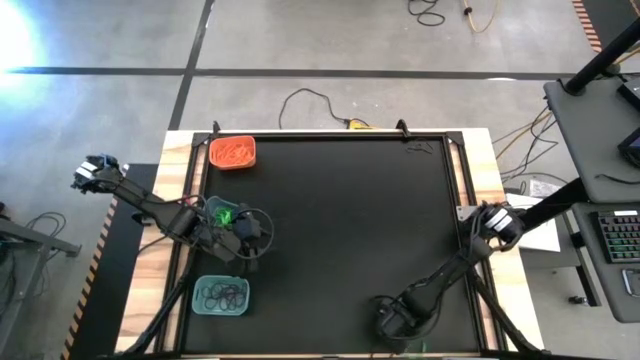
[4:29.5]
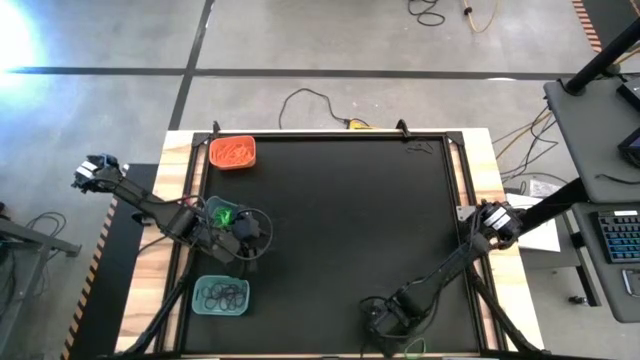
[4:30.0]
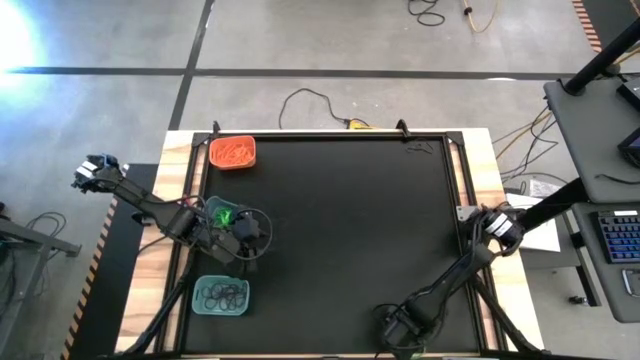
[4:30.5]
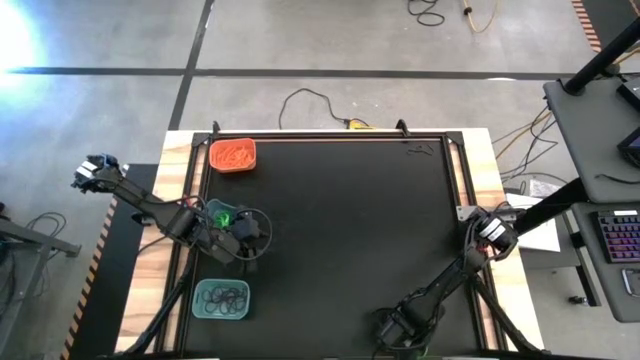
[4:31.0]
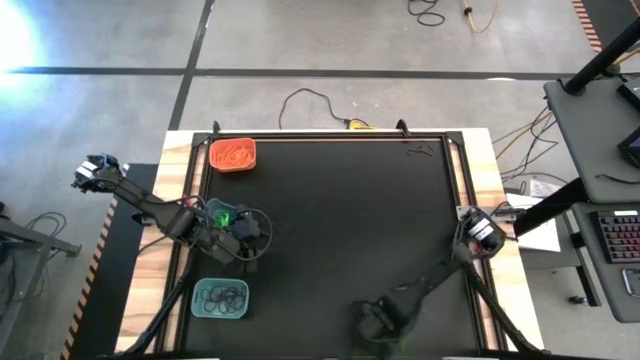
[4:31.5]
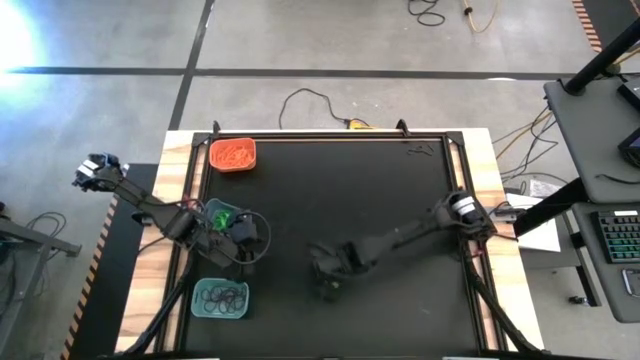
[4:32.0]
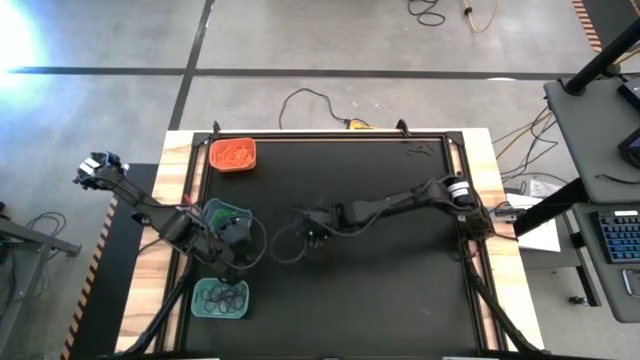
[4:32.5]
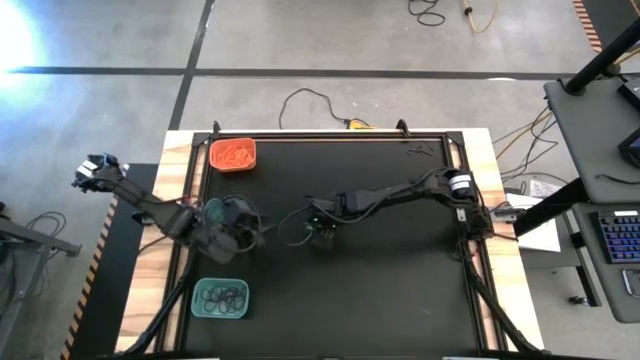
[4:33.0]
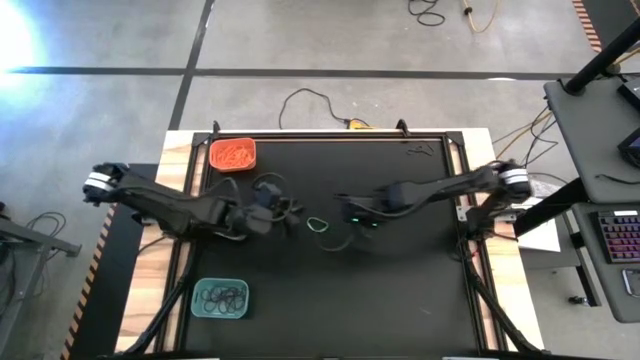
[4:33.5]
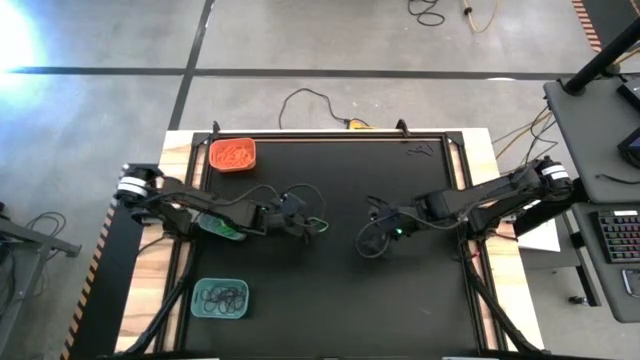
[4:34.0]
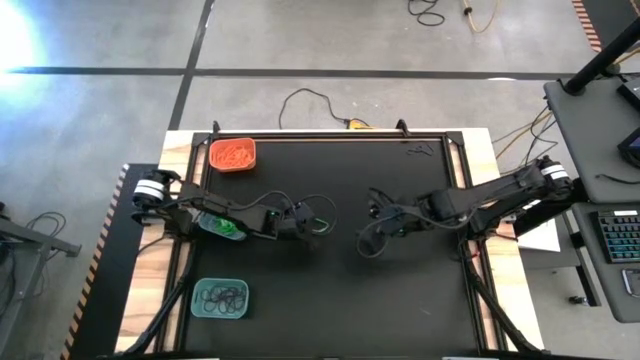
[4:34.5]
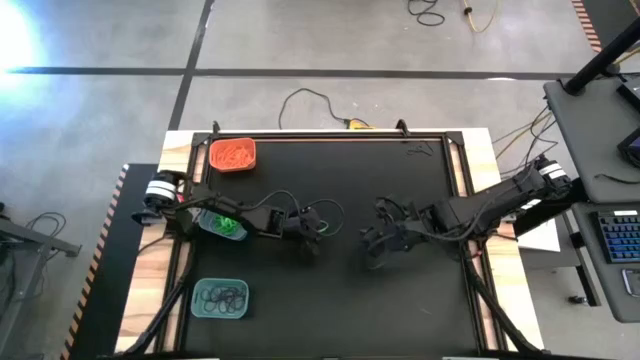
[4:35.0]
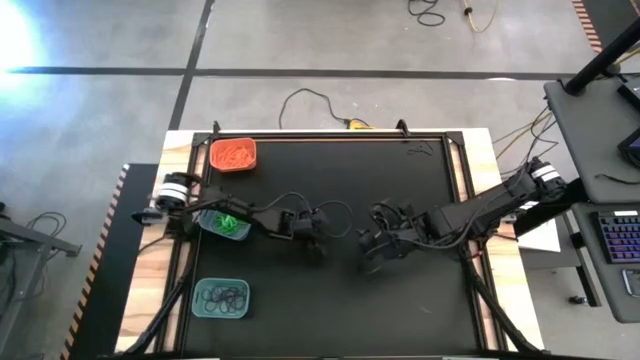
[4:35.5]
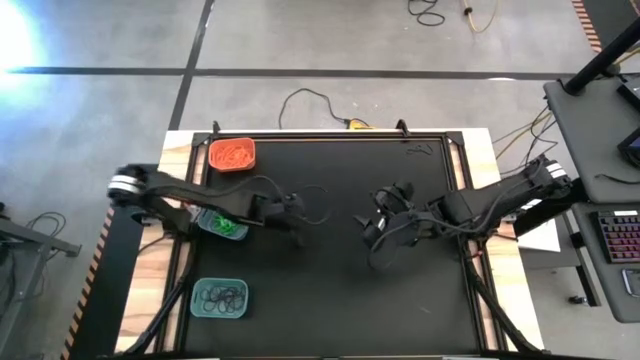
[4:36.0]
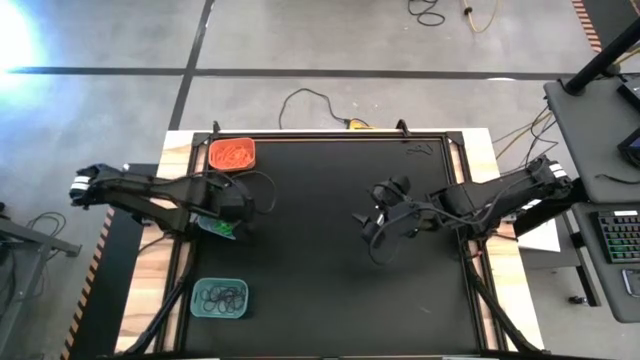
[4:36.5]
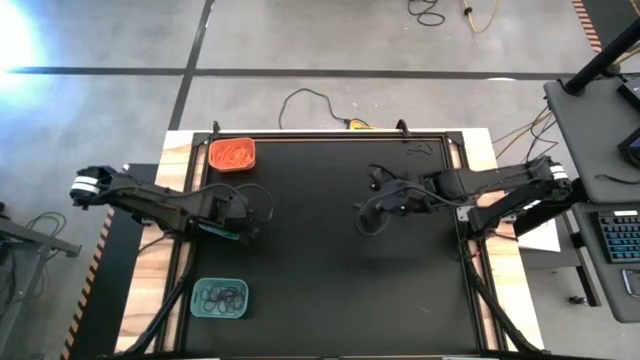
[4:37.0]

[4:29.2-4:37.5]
Task: Sort rubber bands into baskets
Put the green rubber band into the blue bin

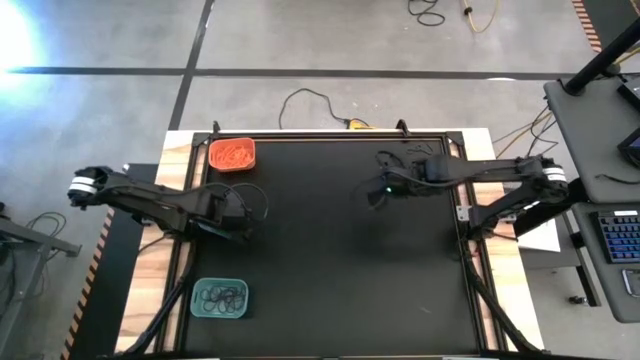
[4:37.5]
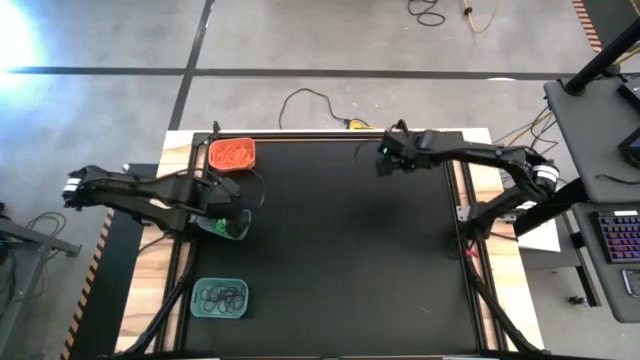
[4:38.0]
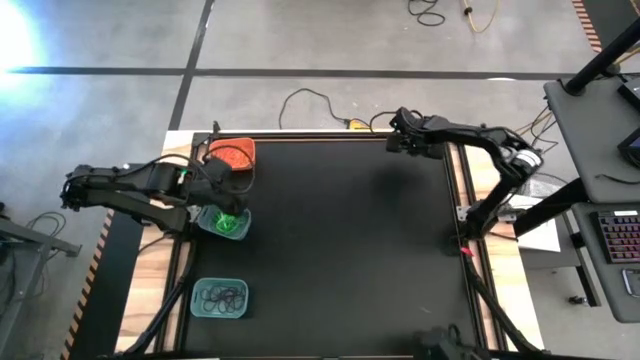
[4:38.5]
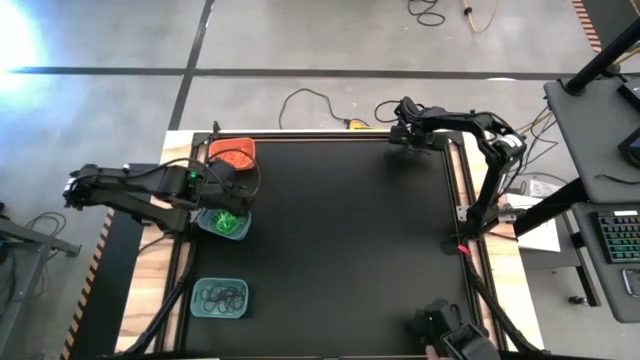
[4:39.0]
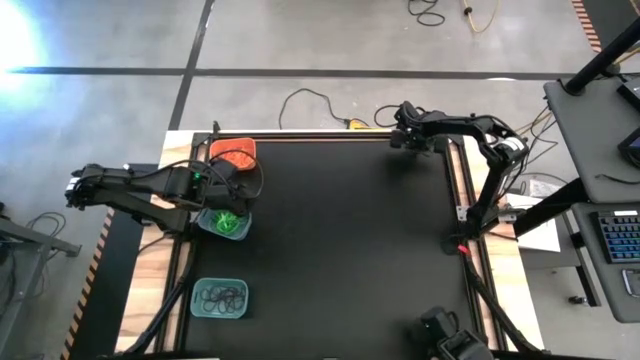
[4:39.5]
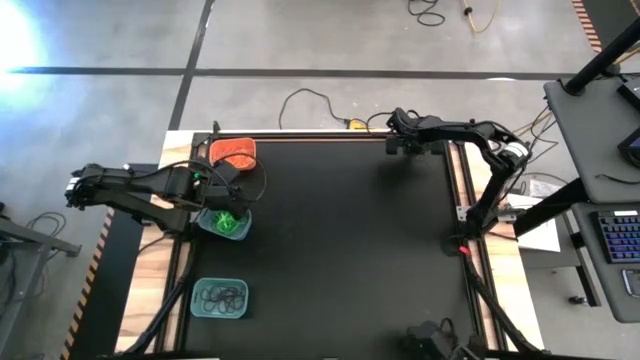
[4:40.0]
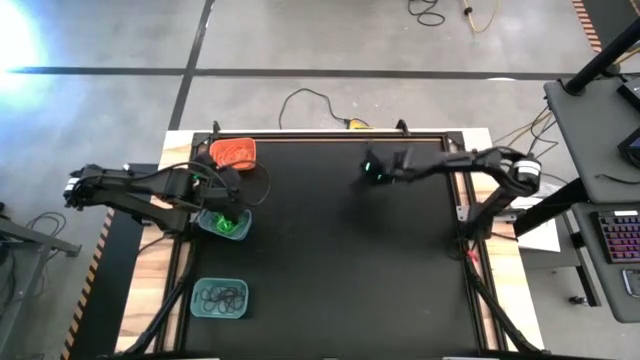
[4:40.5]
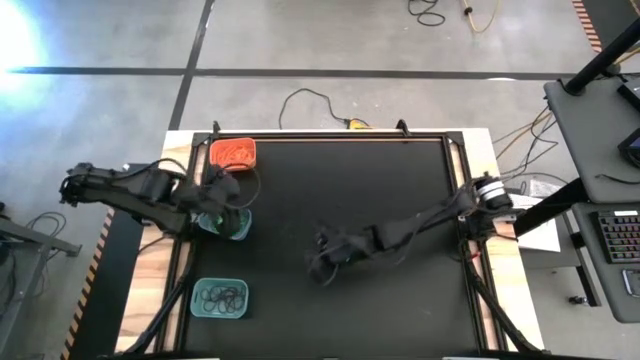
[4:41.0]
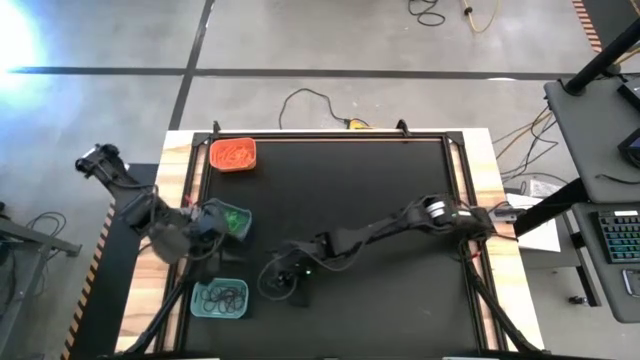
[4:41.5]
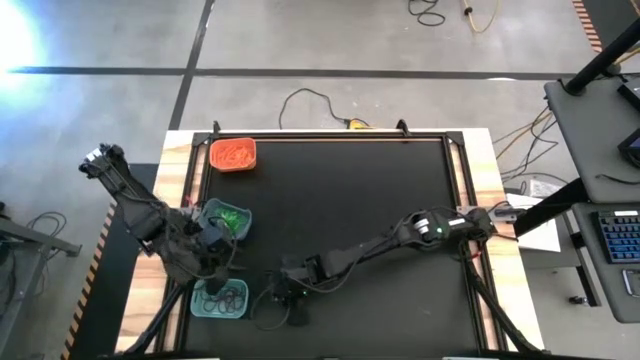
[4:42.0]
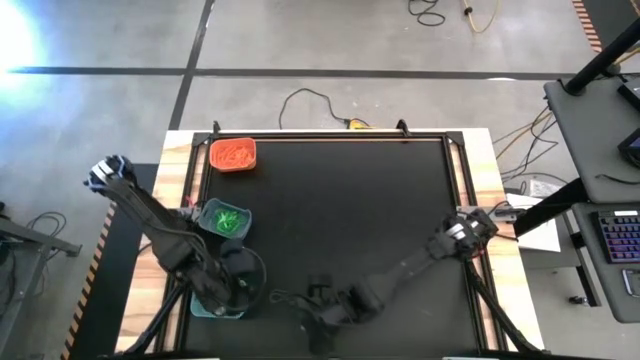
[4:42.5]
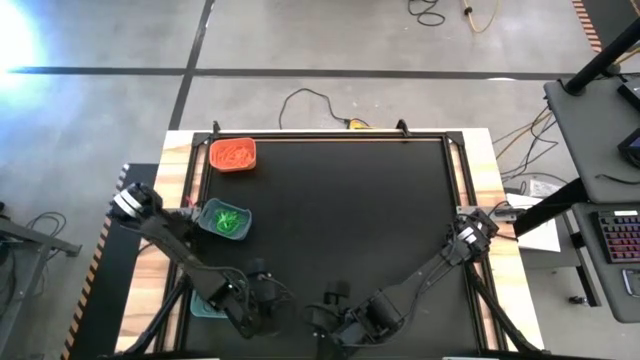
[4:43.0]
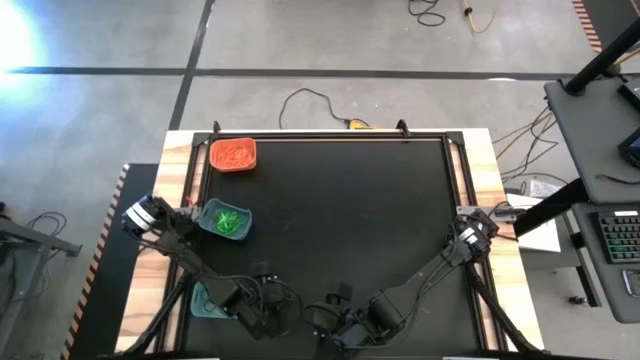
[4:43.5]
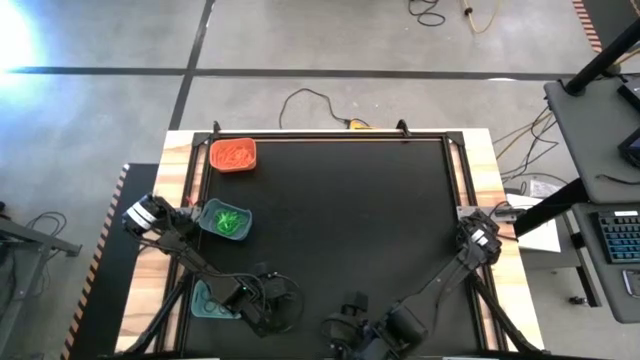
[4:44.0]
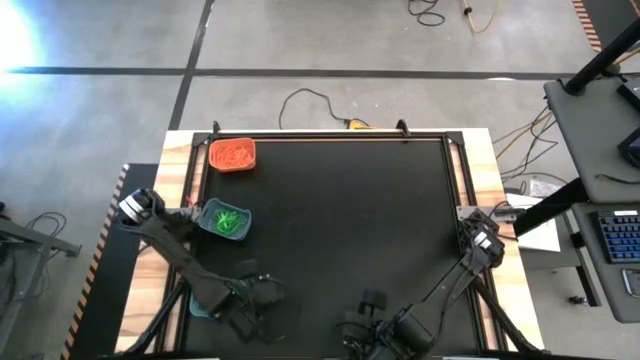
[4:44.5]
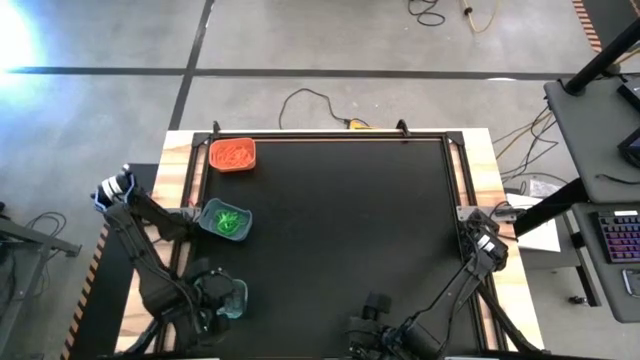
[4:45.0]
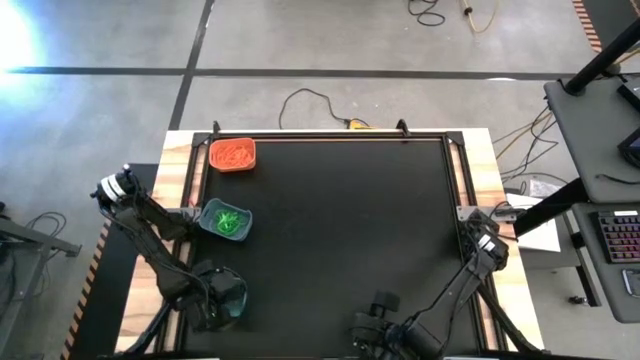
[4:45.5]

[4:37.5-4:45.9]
Put the purple rubber band into the green bin

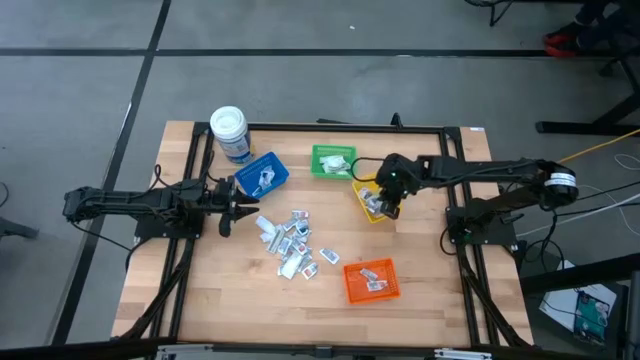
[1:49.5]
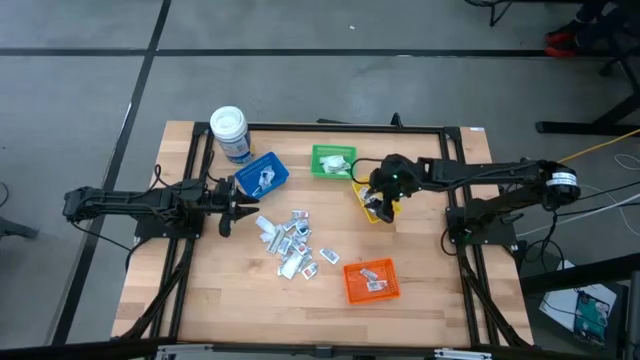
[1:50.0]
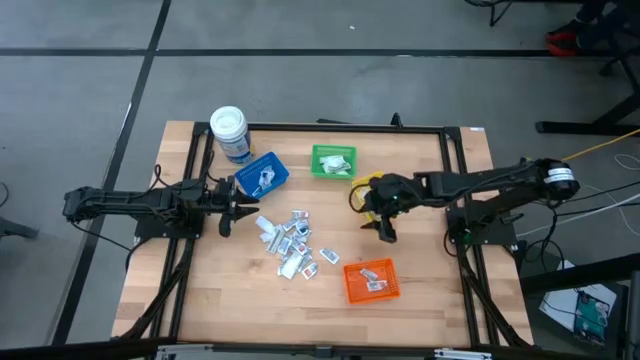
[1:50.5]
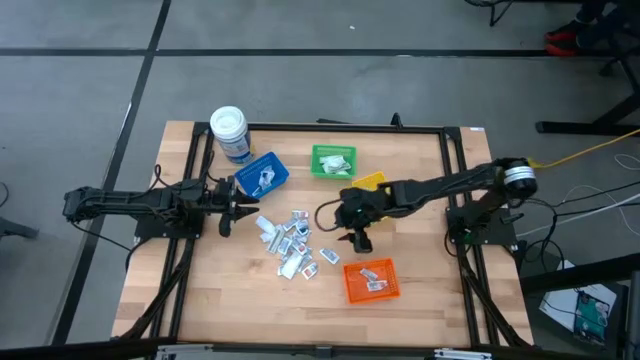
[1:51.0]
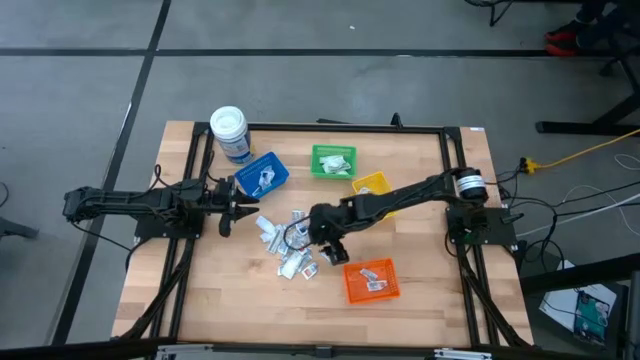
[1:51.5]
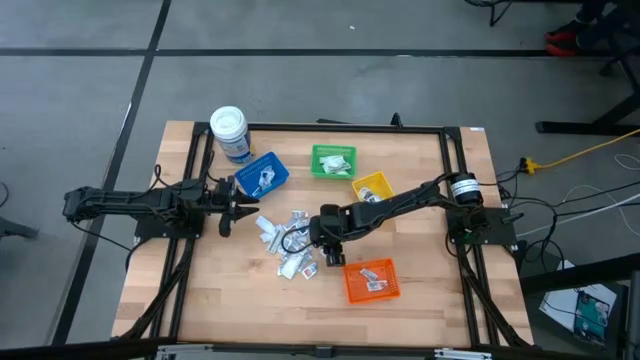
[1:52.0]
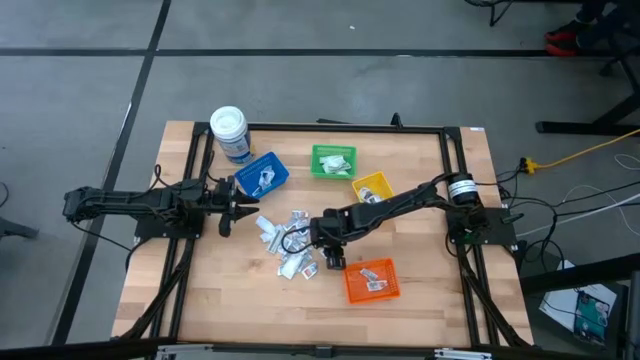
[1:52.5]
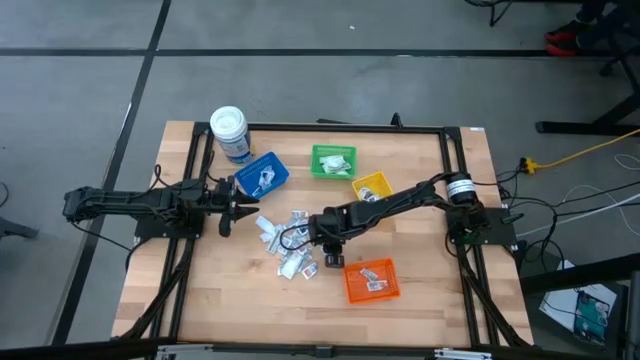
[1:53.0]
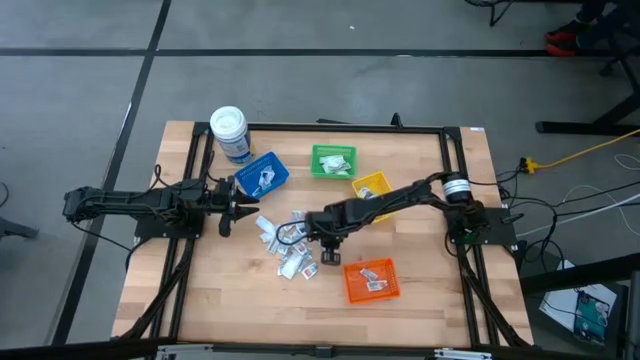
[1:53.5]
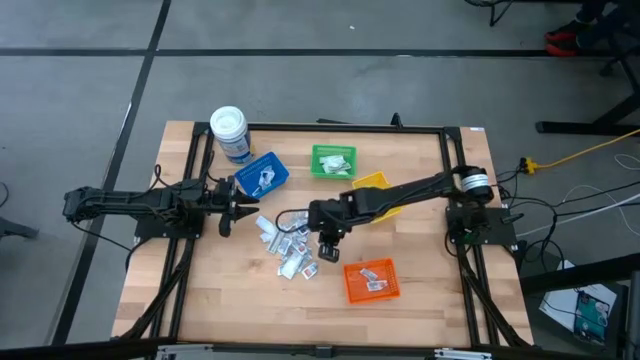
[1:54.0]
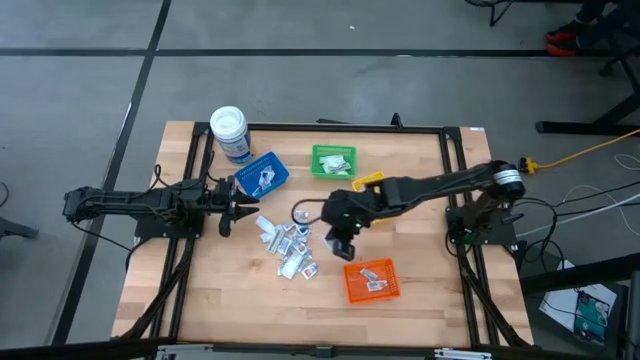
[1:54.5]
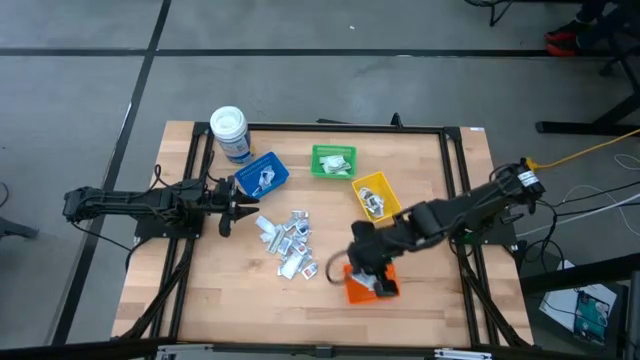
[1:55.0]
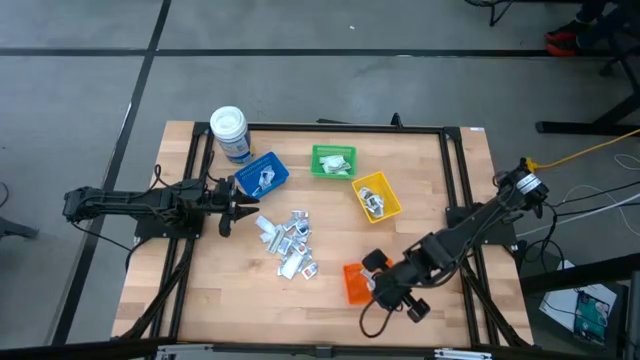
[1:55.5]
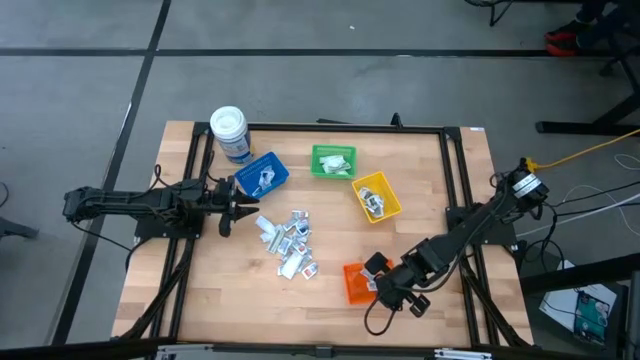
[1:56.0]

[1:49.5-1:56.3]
Task: Pick & Place First Aid Supplies
Put the white ointment pack into the orange bin
